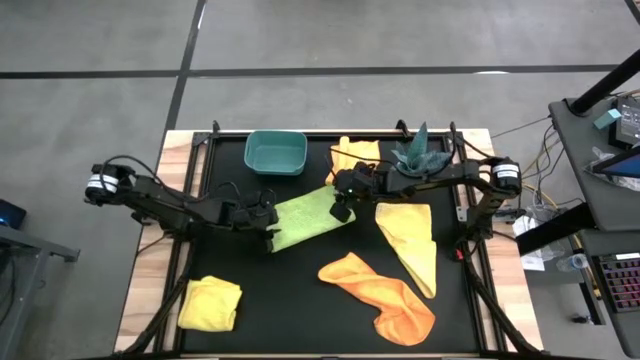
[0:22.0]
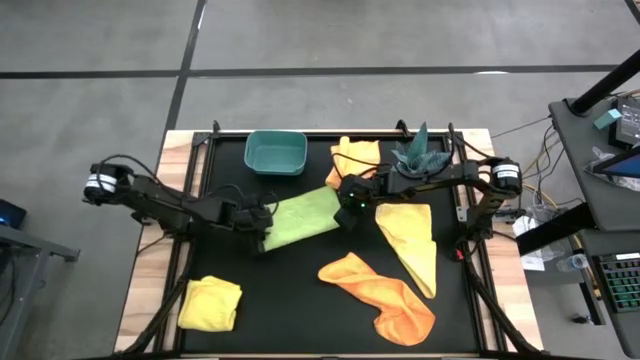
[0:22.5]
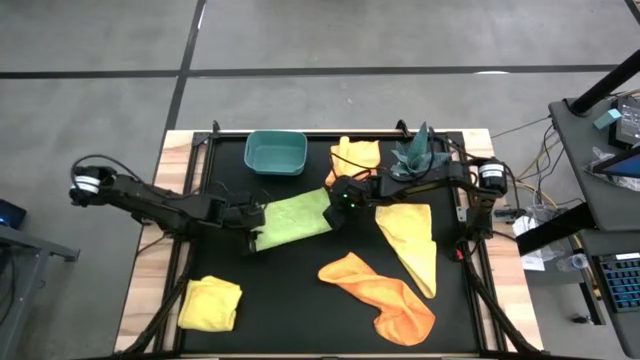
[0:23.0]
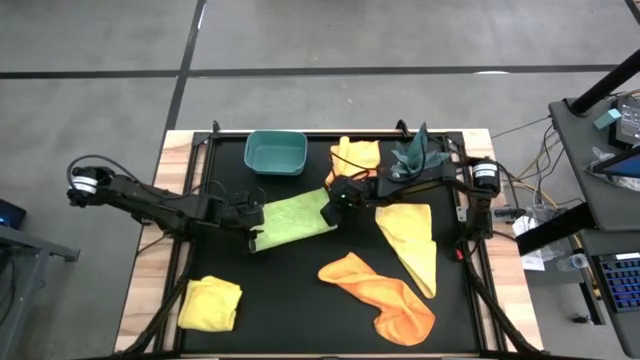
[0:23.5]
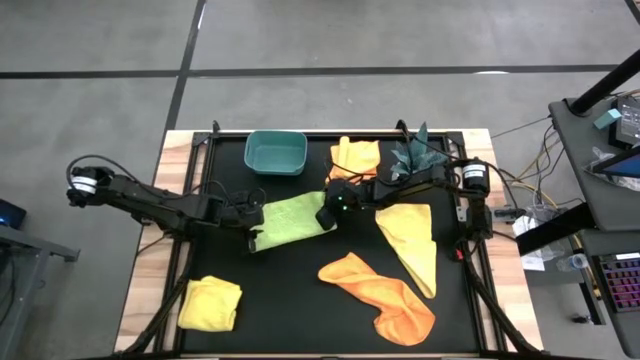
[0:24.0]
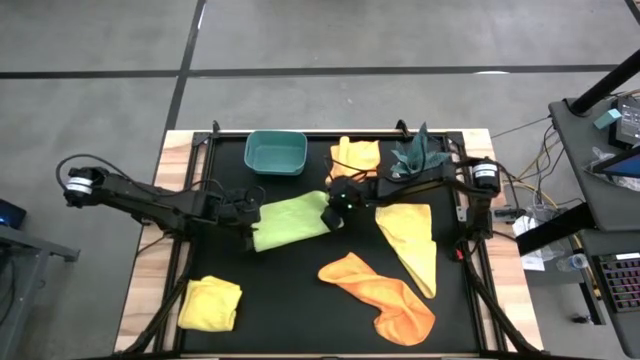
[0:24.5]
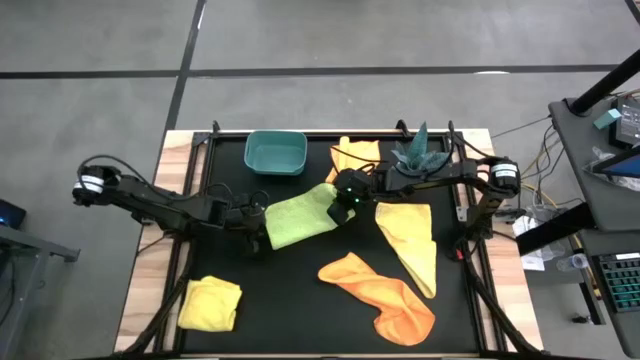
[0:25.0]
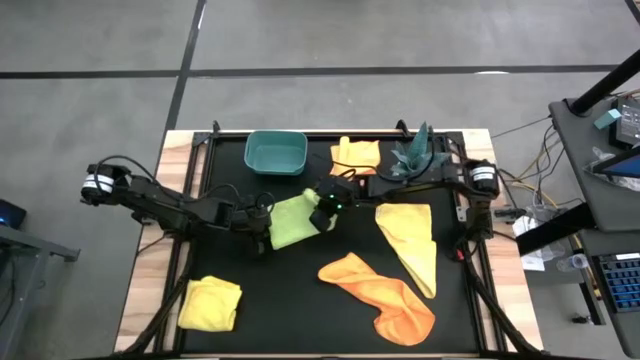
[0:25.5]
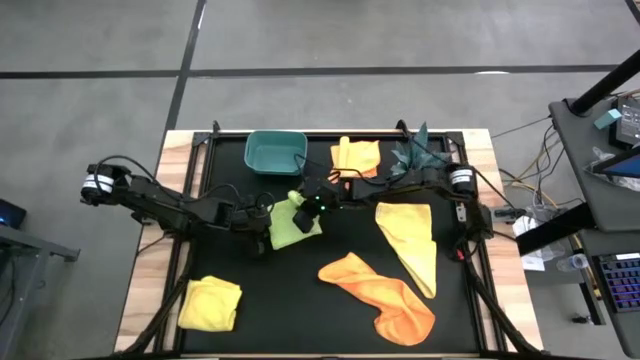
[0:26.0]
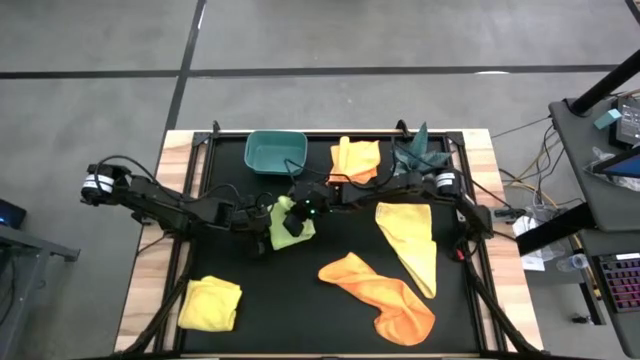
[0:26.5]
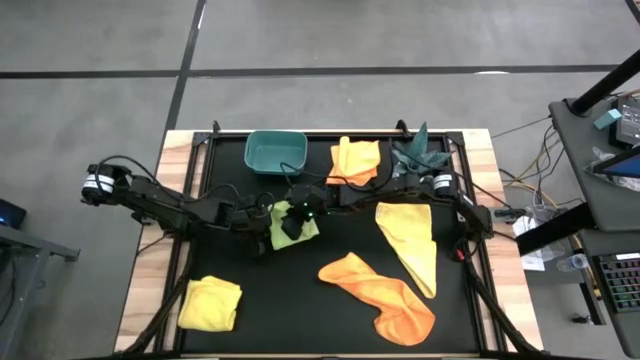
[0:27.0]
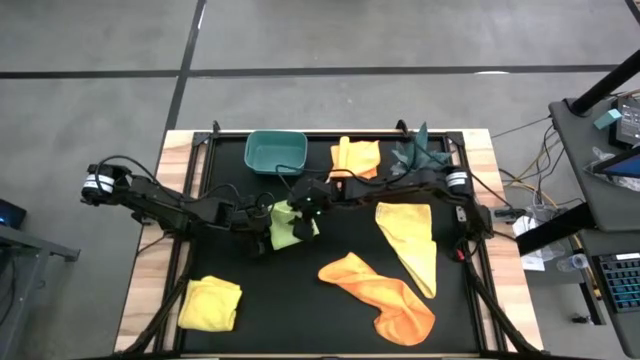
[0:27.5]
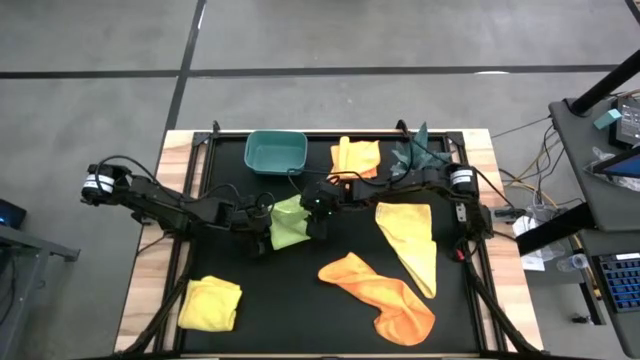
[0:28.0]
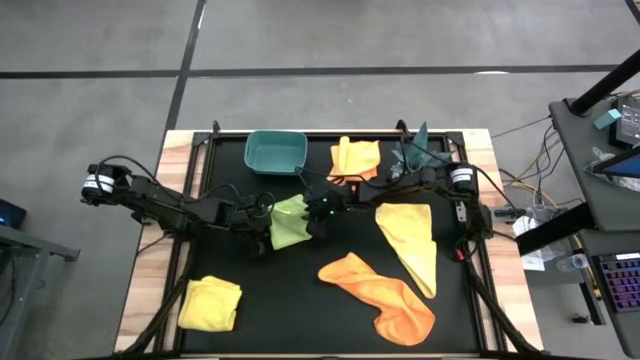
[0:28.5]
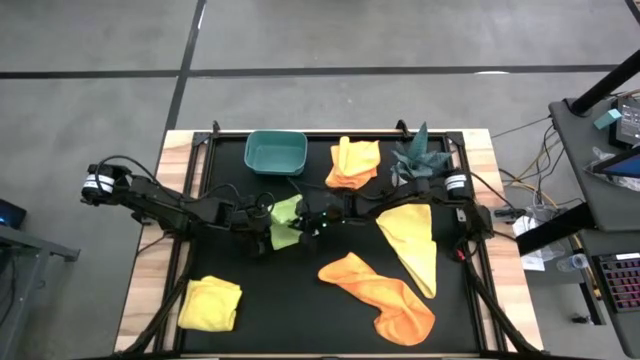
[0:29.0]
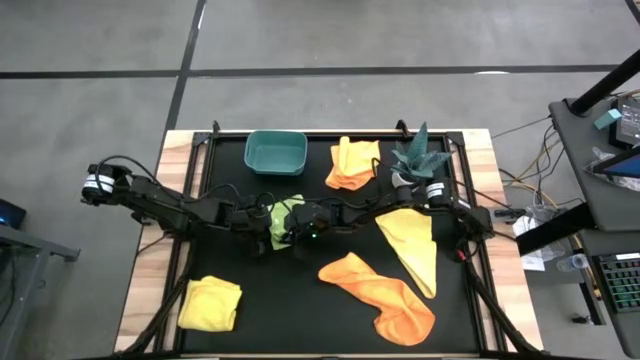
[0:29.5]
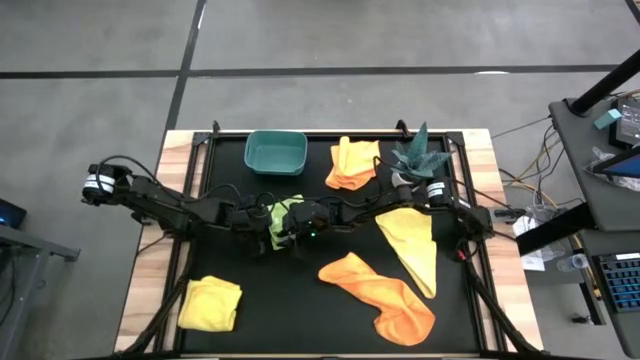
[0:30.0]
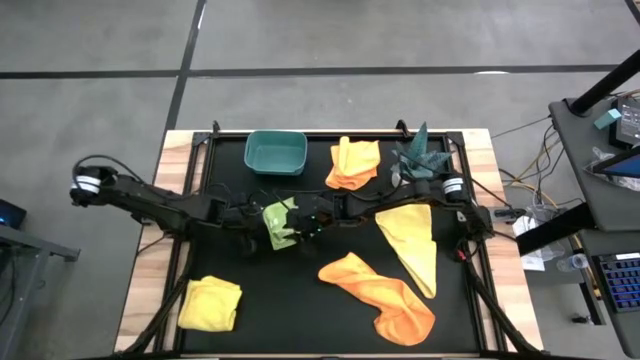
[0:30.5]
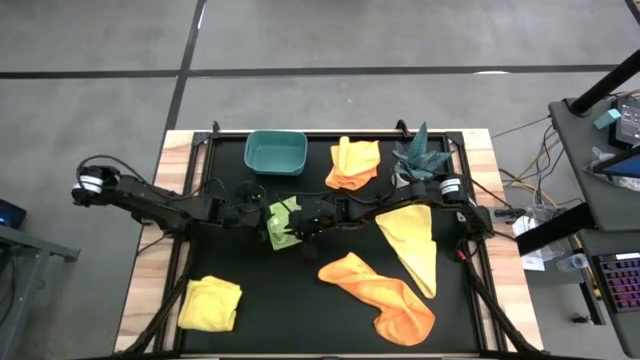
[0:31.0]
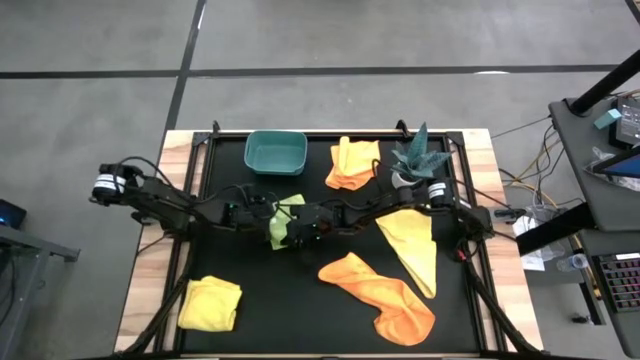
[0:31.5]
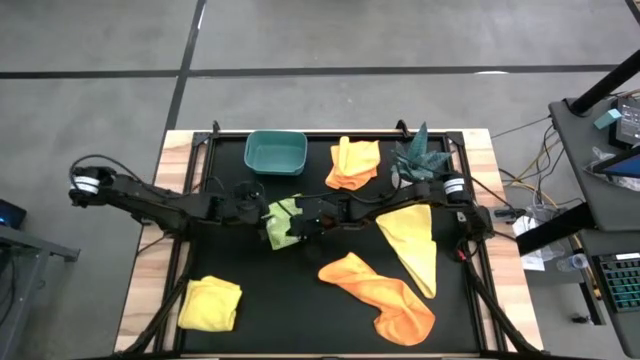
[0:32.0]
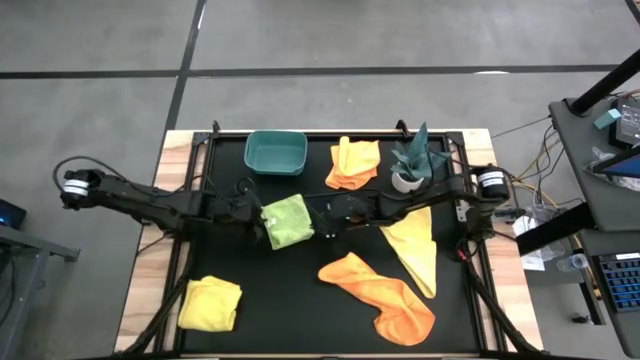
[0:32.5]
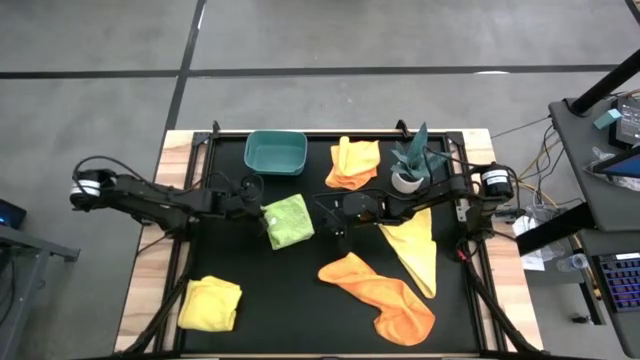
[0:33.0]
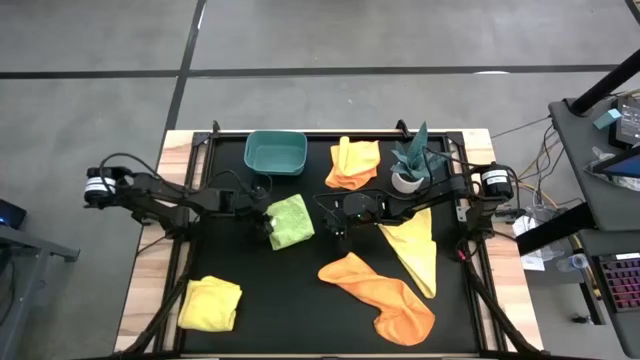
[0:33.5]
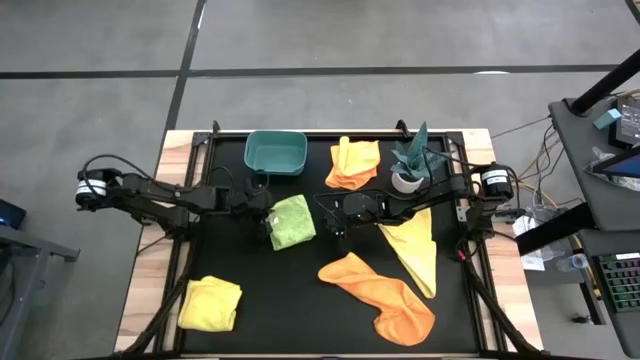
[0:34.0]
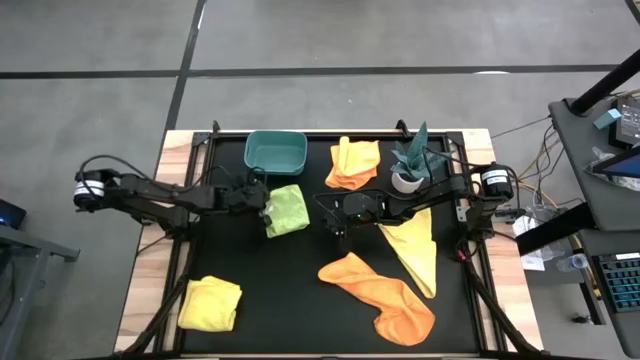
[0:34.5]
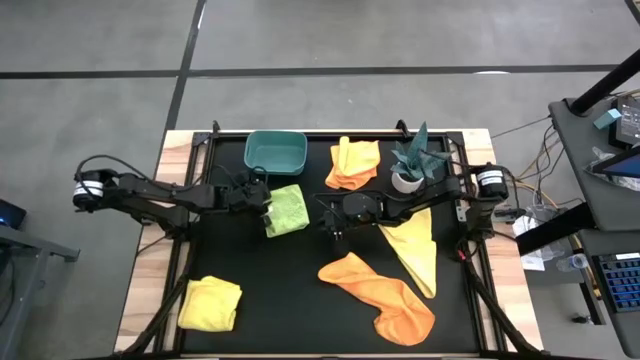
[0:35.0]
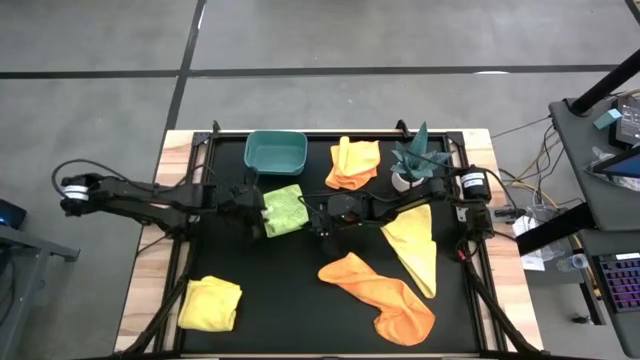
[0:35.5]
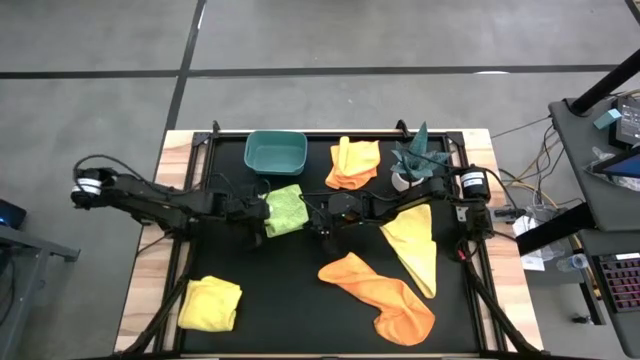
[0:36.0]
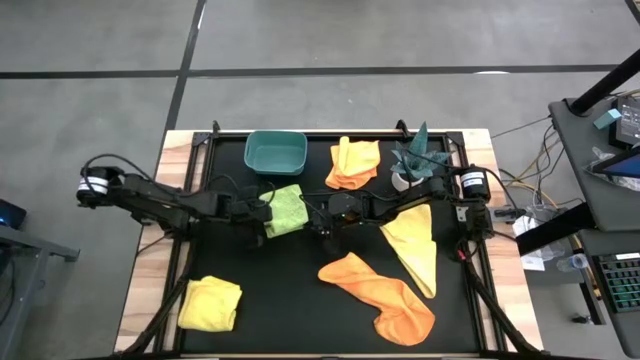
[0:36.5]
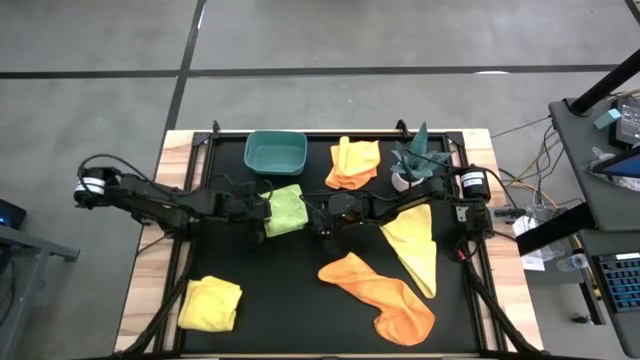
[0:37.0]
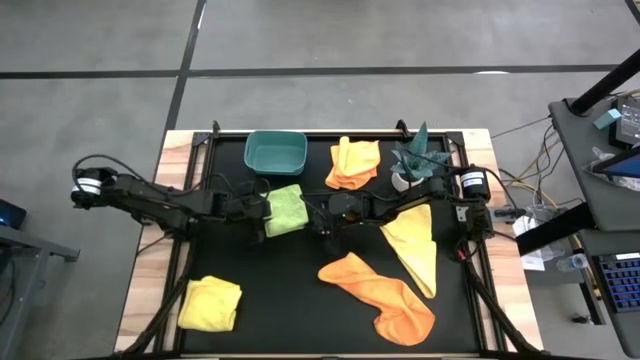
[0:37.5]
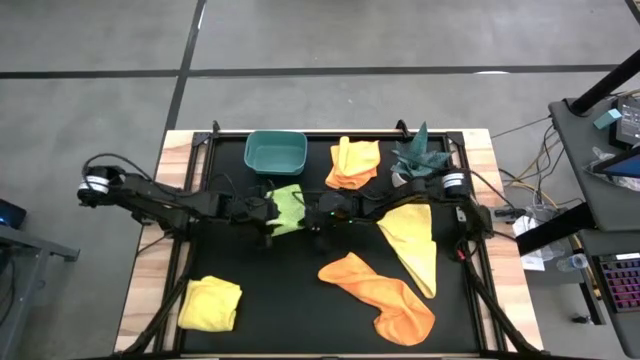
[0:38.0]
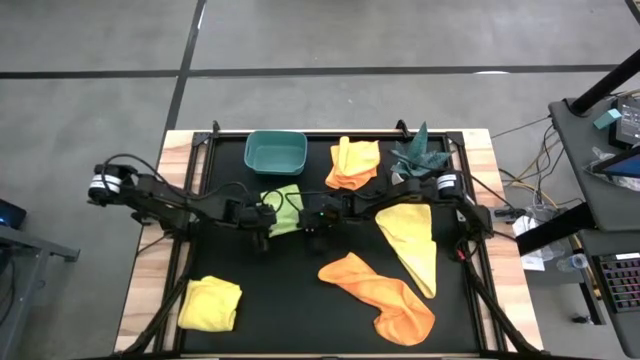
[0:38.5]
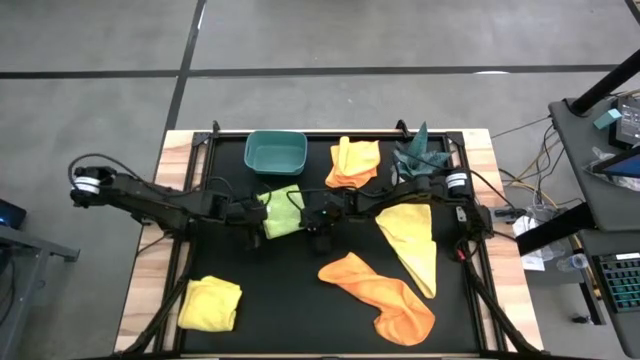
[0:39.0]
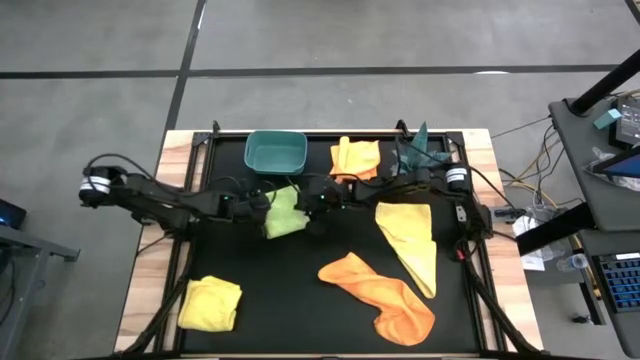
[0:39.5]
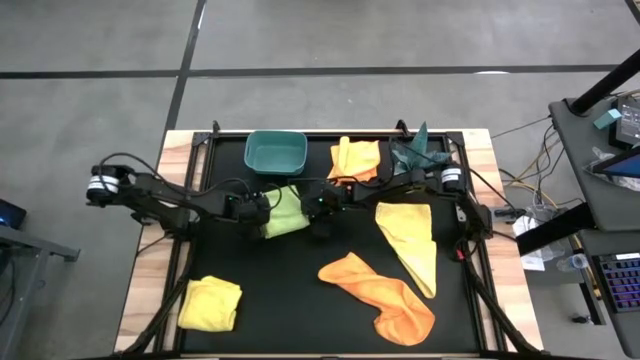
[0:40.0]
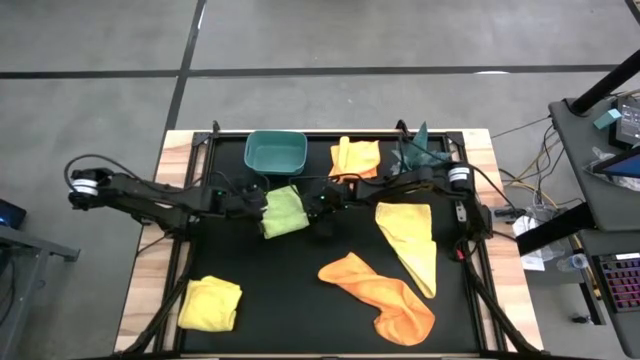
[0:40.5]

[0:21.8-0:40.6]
Task: Fold microfiber towels
Fold the green microfiber cloth

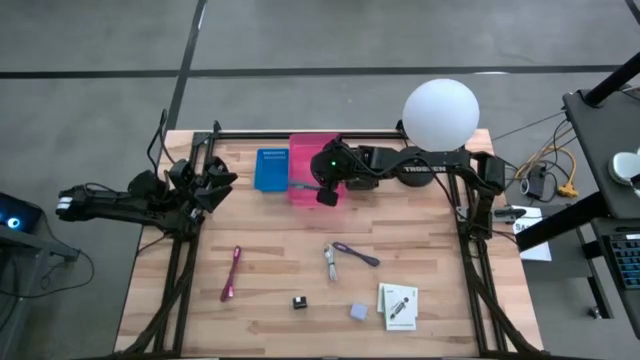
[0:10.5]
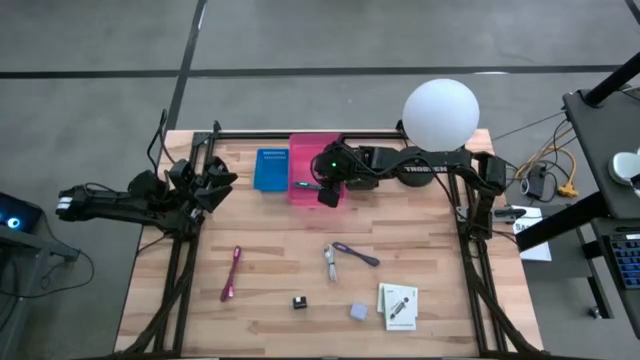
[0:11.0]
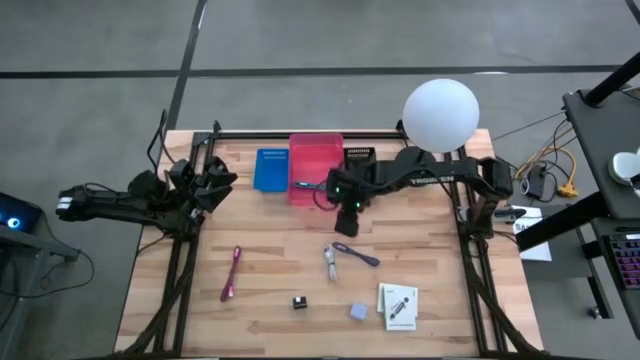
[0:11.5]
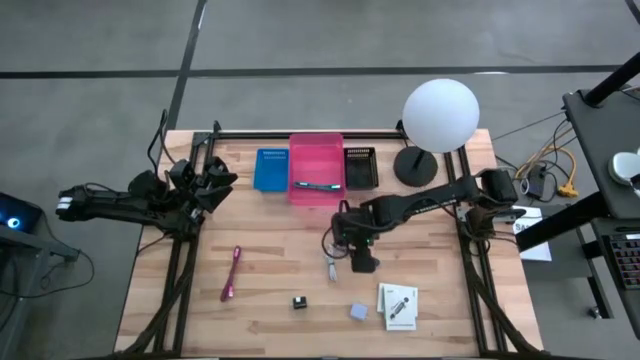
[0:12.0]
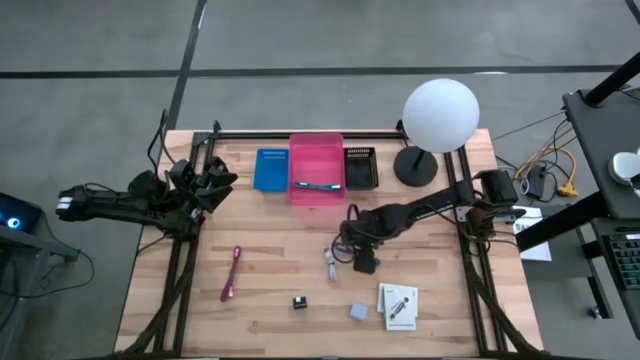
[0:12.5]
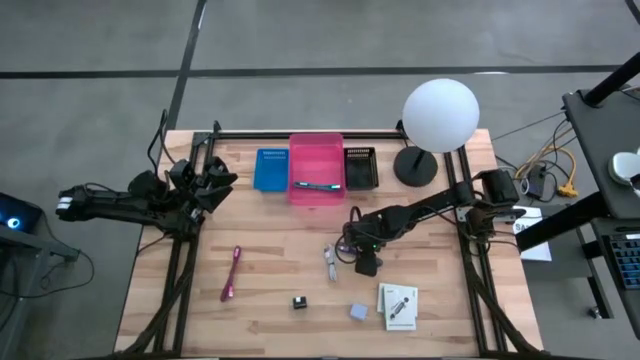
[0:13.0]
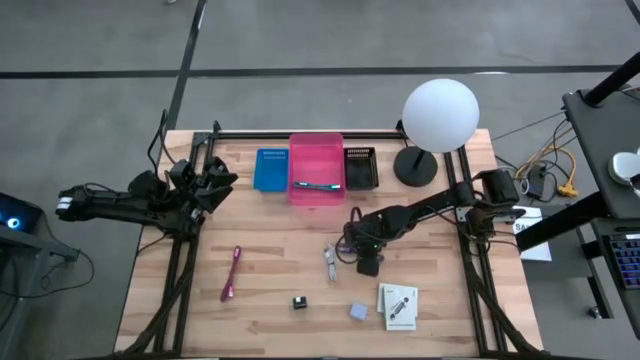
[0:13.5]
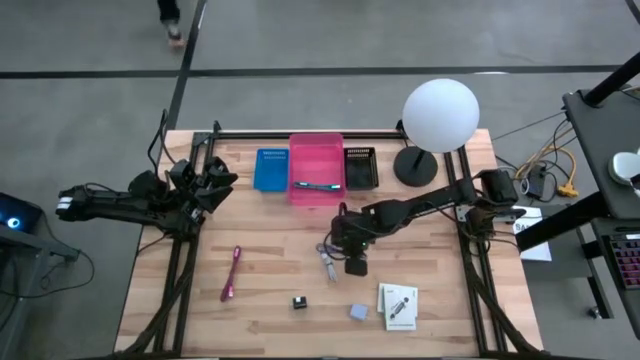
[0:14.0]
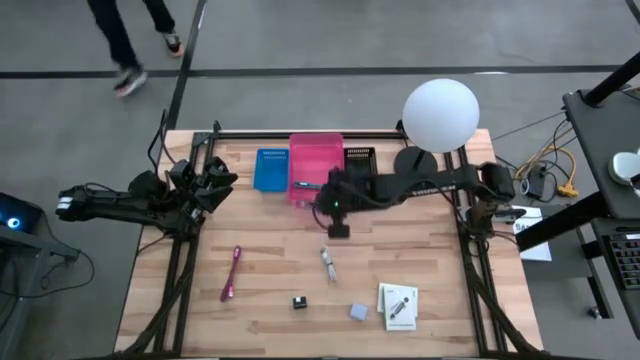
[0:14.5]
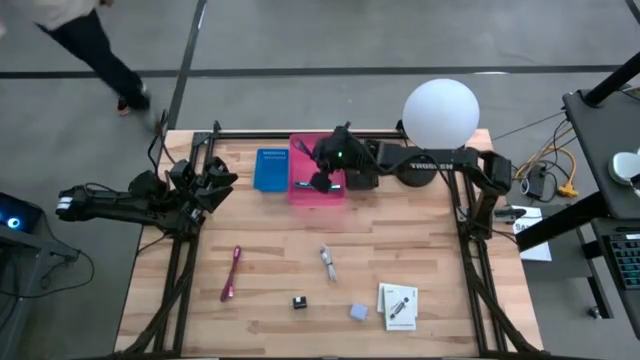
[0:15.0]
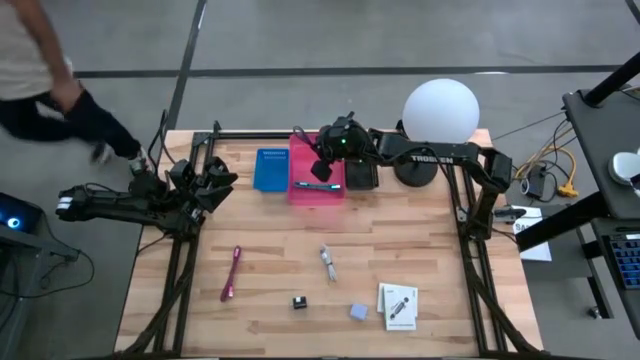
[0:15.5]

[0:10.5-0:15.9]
Task: Pick and place items into bin
Put the dark blue charger cable into the pink bin
